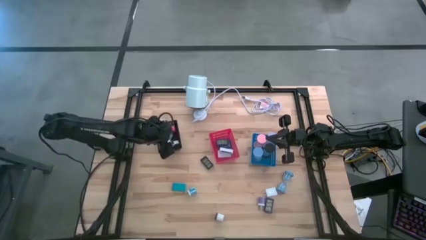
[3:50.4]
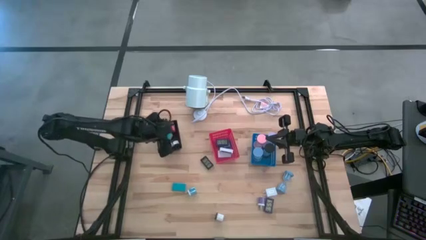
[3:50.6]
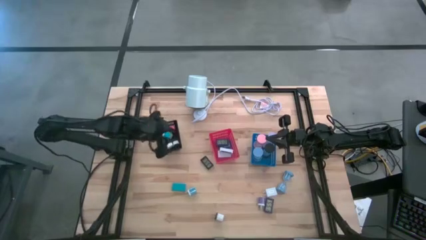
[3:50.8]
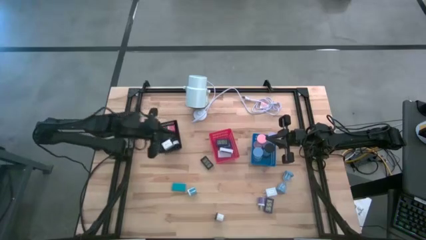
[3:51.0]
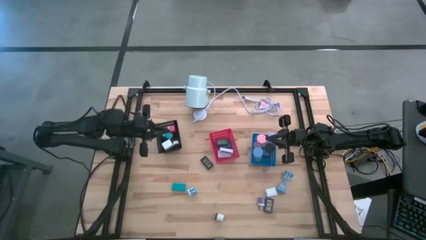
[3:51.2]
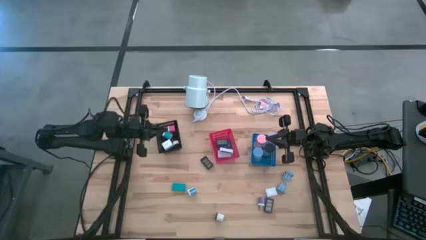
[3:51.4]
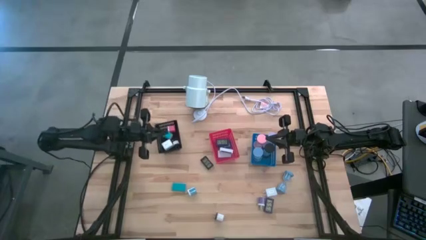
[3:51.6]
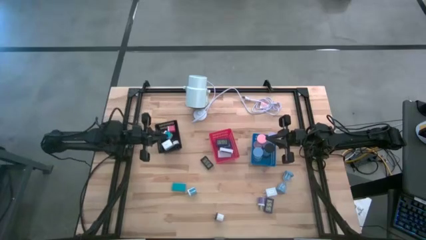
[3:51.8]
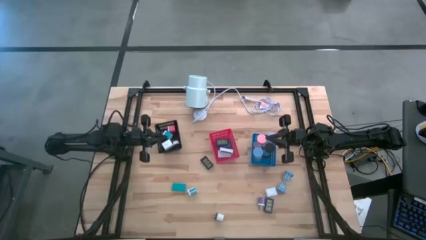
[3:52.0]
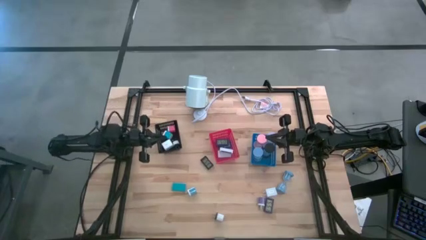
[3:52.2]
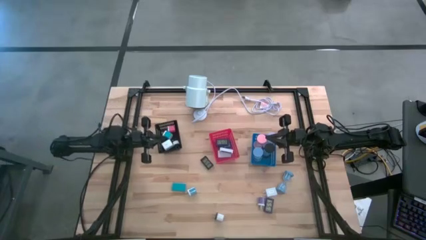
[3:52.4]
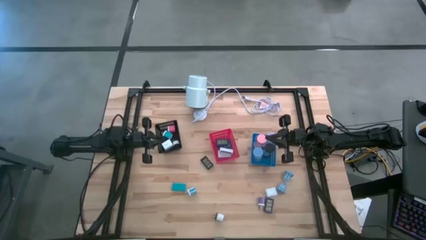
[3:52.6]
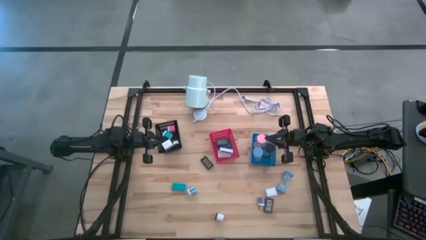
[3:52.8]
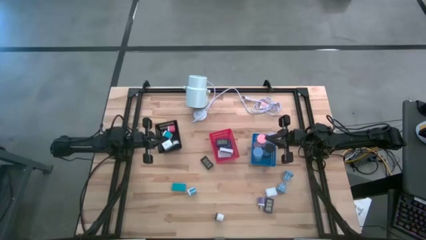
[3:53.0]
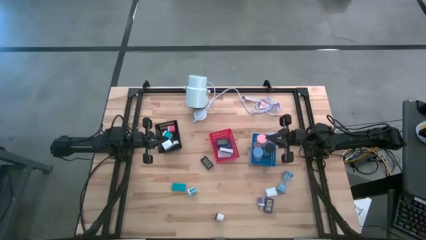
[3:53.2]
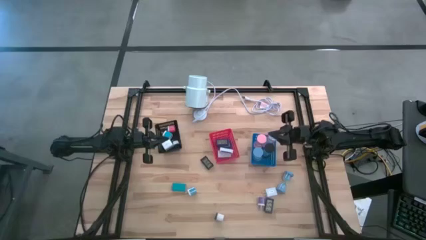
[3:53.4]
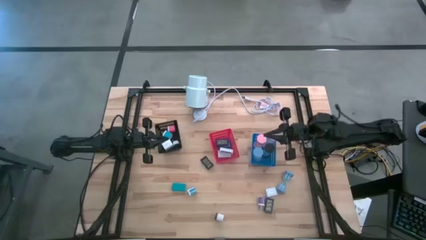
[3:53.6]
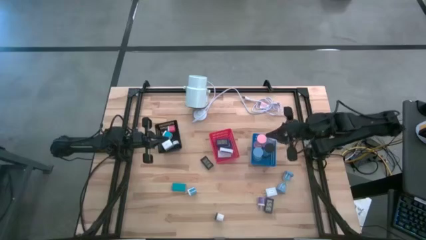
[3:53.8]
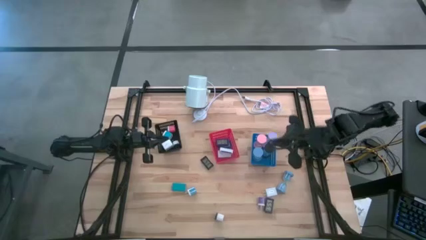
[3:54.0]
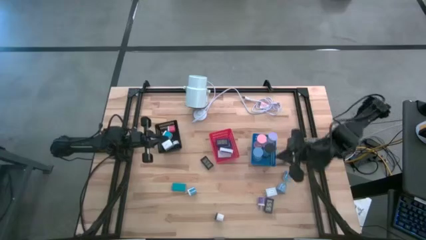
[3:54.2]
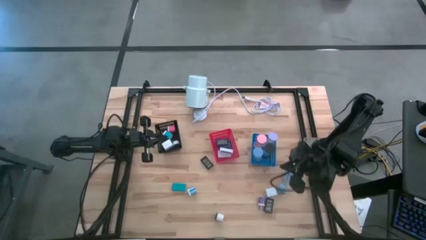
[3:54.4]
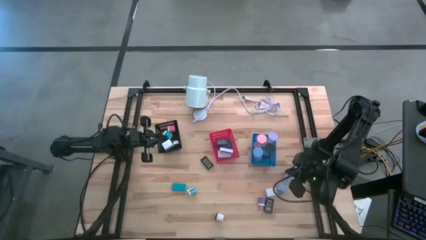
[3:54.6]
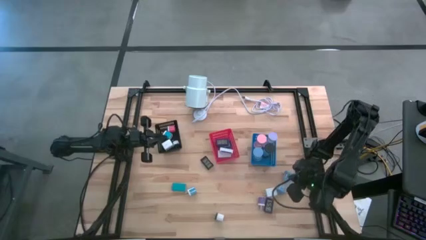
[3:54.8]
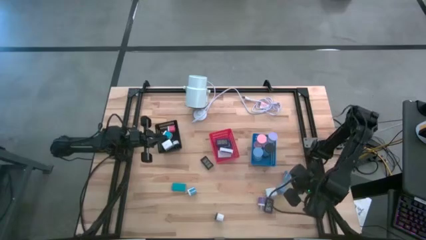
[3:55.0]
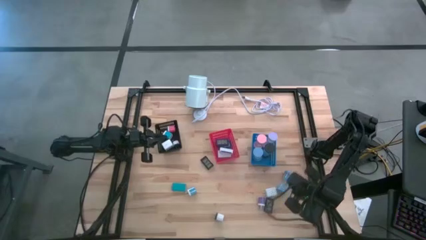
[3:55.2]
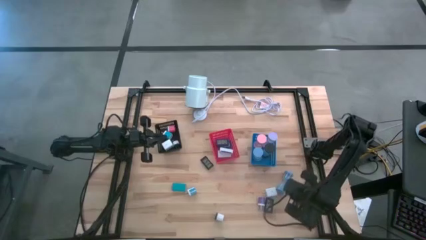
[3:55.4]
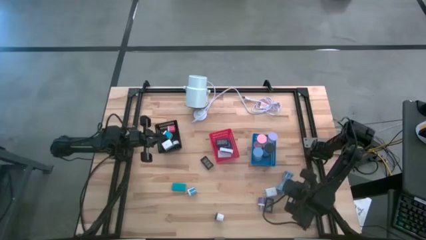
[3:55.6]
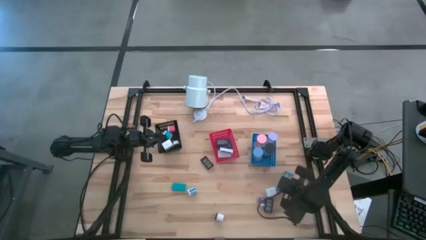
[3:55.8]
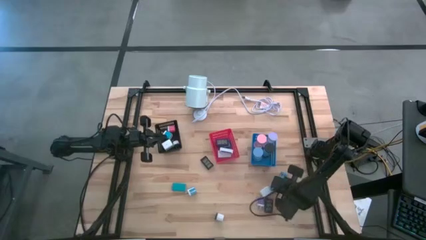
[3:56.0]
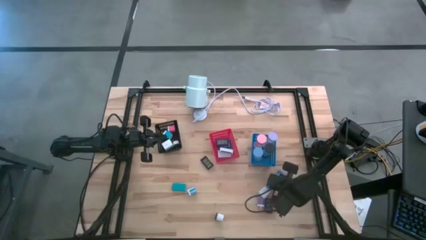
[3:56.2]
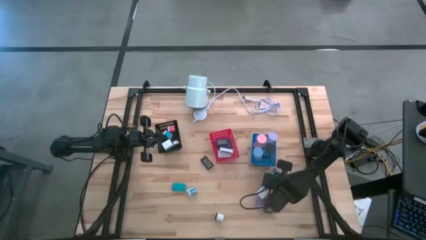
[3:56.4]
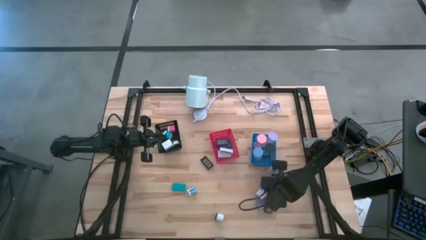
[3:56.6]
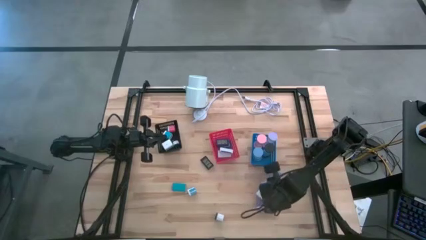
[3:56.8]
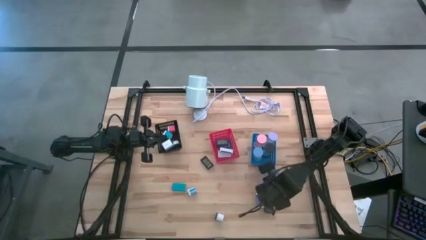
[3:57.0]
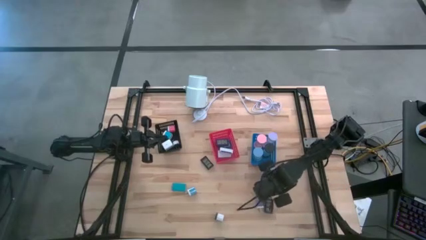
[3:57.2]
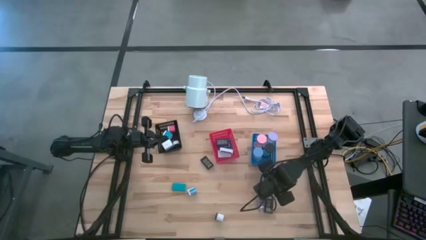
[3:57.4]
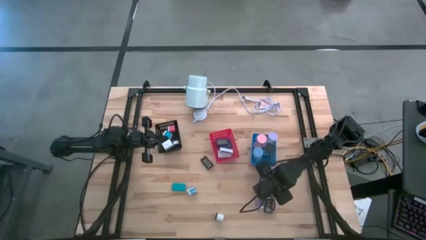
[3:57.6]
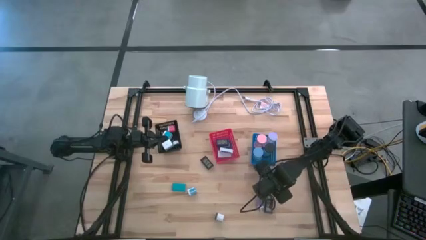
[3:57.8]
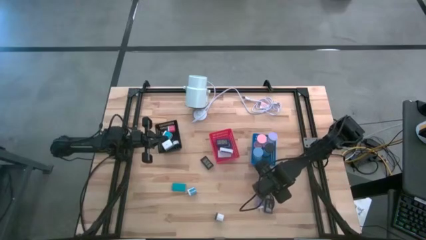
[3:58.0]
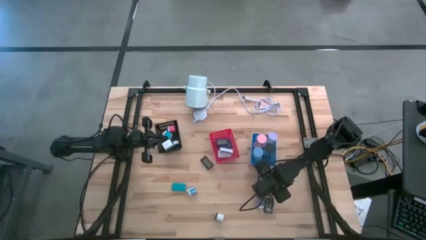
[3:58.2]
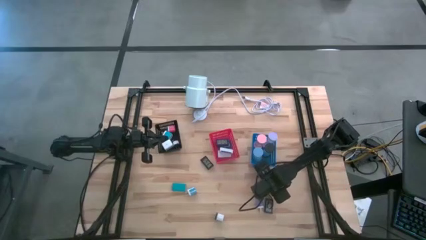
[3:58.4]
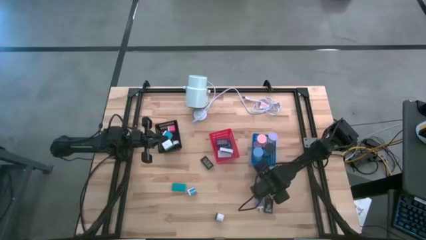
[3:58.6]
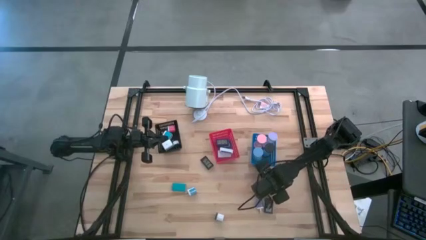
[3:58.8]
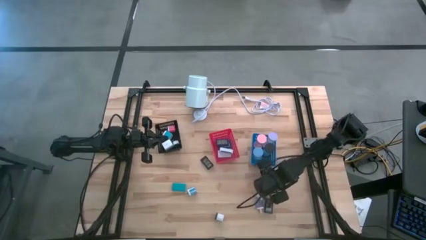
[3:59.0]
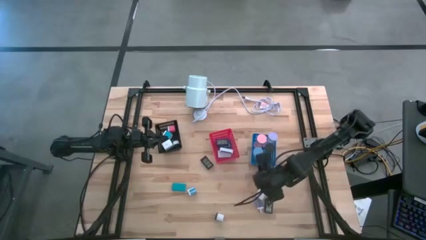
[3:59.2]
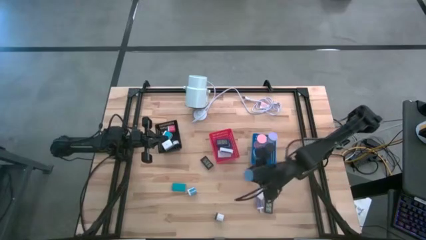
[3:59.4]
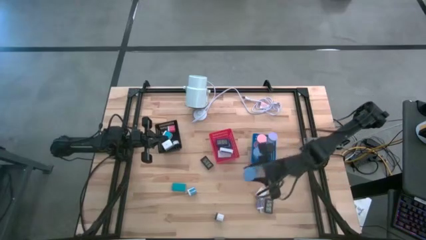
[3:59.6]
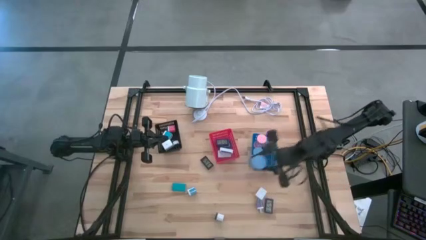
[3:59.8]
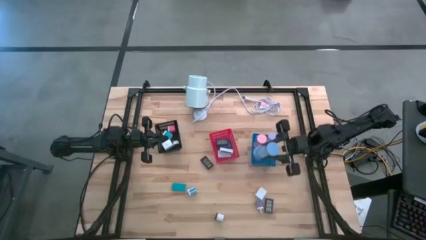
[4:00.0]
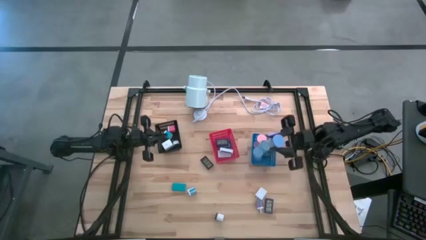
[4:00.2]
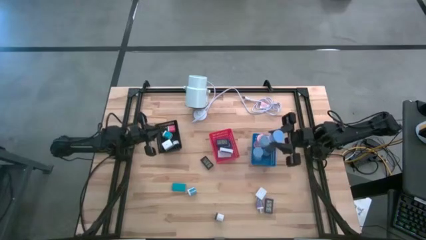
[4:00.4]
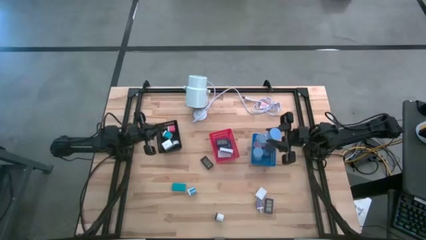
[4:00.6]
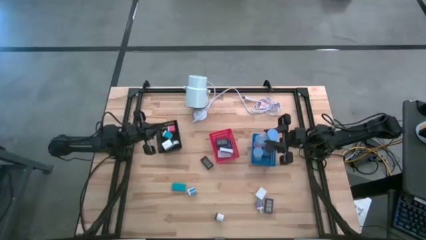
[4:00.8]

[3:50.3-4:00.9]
Task: Pick & Place Office items
Put the blue hourglass into the blue bin

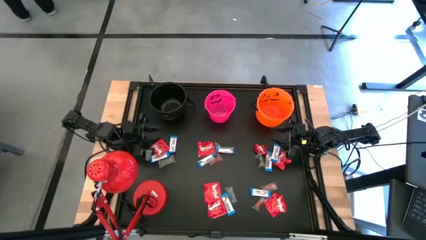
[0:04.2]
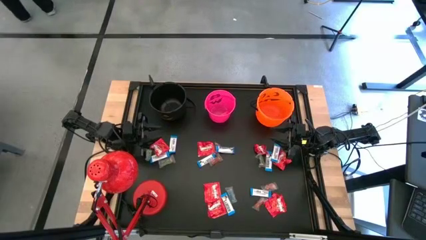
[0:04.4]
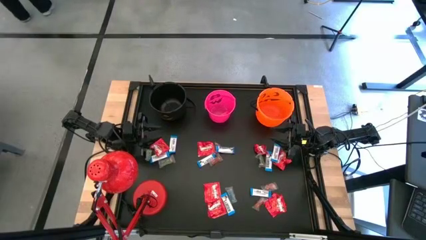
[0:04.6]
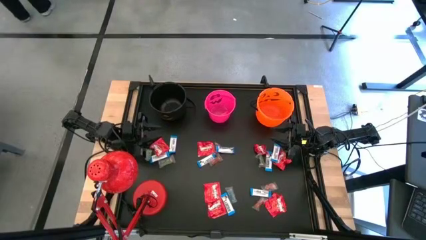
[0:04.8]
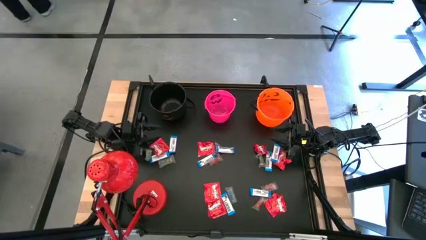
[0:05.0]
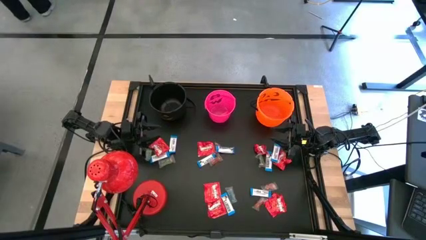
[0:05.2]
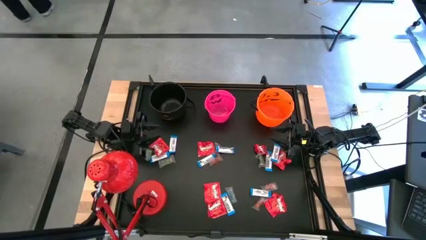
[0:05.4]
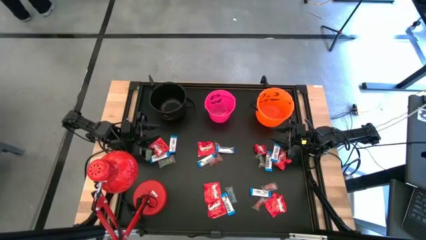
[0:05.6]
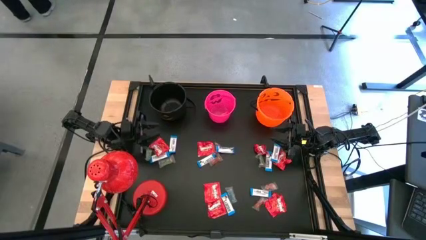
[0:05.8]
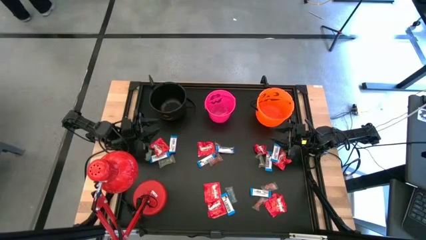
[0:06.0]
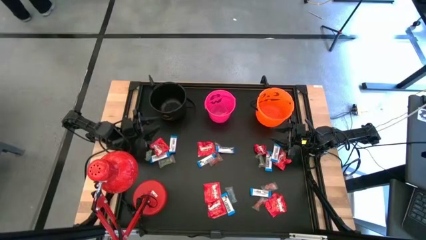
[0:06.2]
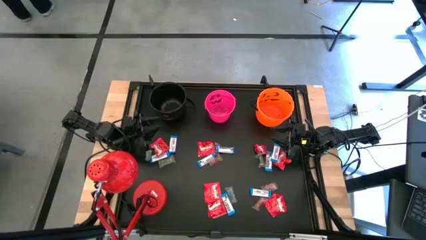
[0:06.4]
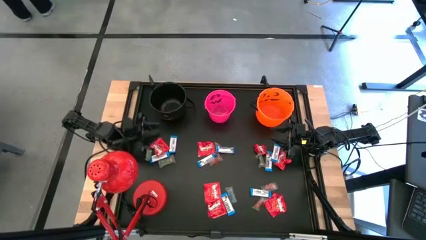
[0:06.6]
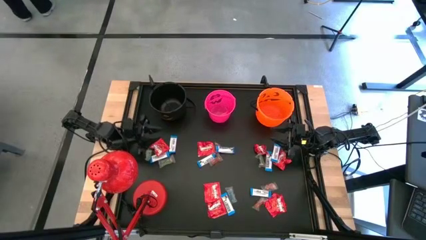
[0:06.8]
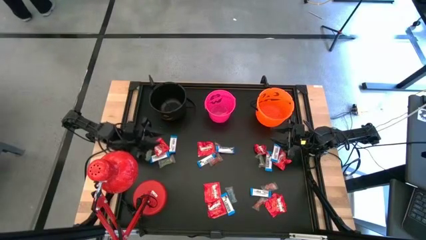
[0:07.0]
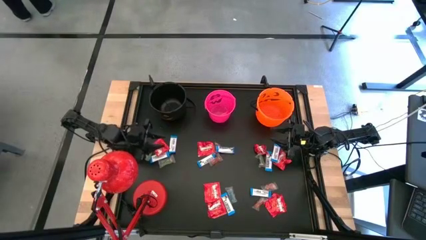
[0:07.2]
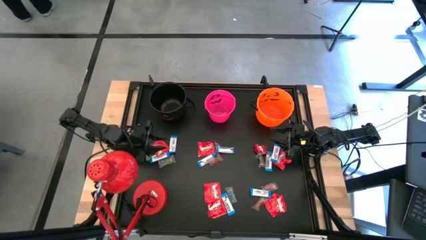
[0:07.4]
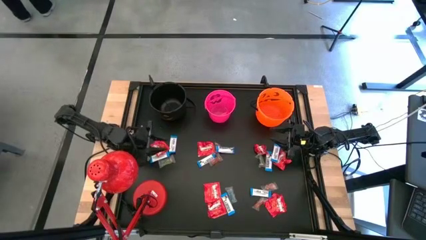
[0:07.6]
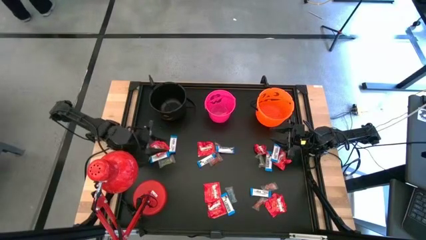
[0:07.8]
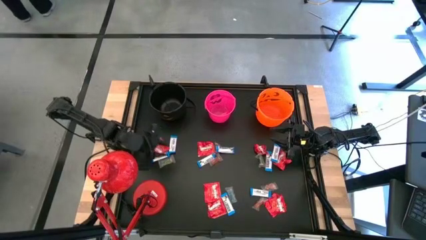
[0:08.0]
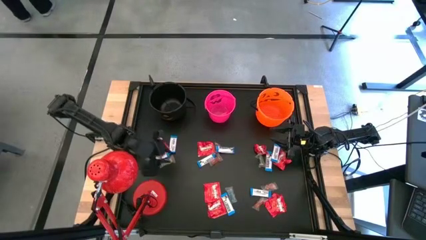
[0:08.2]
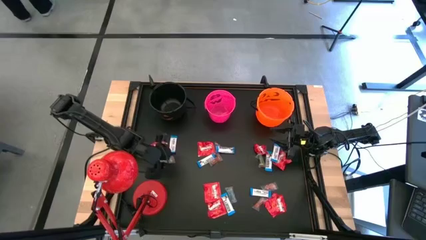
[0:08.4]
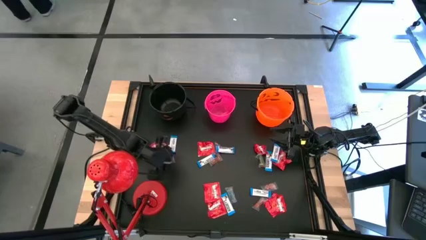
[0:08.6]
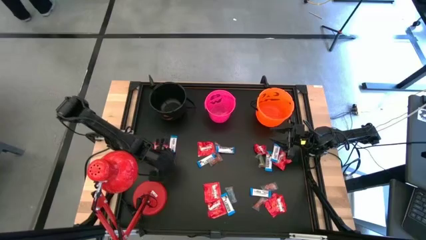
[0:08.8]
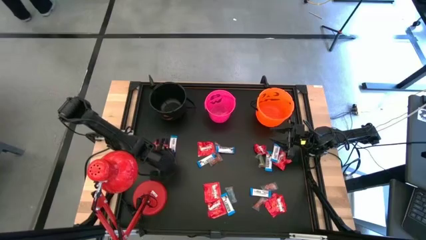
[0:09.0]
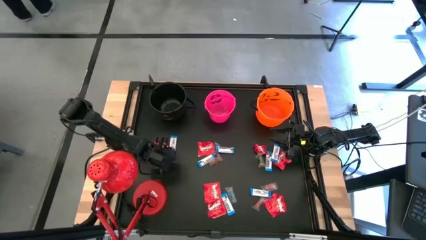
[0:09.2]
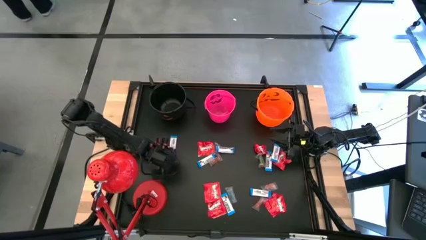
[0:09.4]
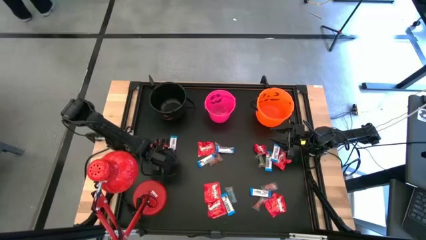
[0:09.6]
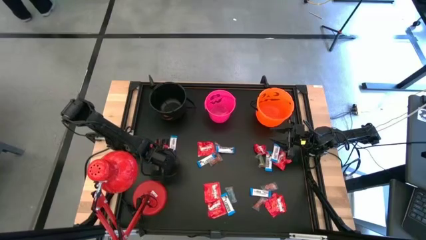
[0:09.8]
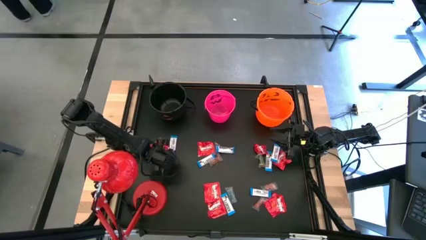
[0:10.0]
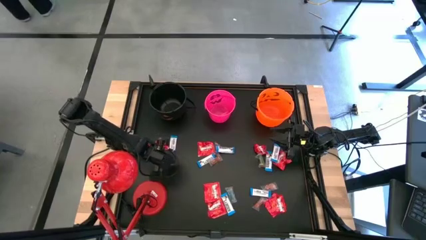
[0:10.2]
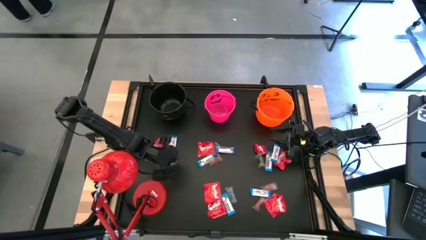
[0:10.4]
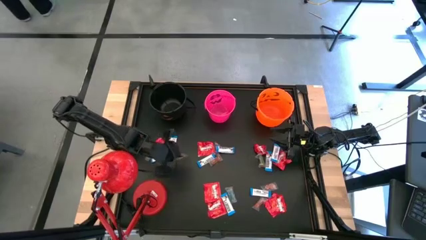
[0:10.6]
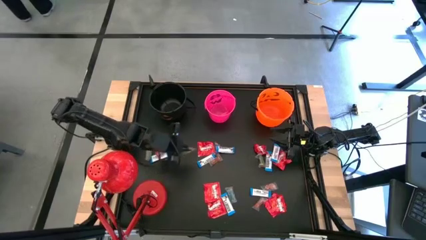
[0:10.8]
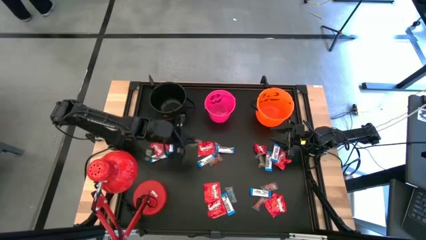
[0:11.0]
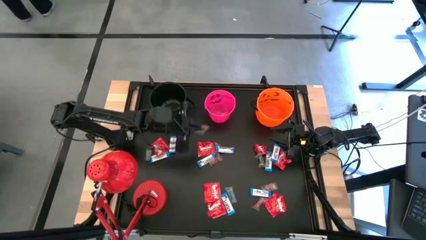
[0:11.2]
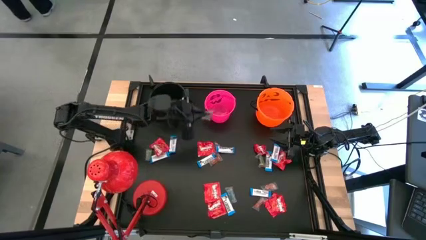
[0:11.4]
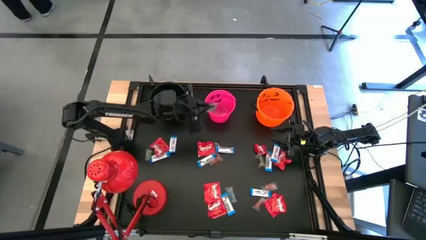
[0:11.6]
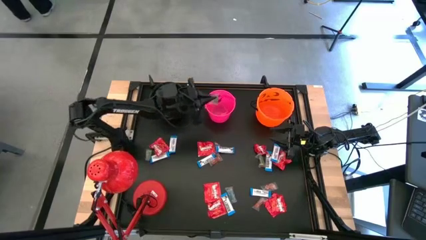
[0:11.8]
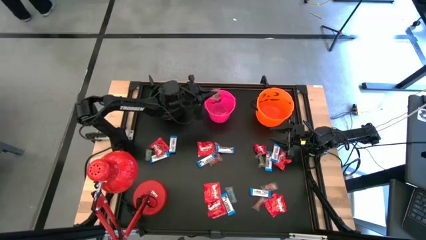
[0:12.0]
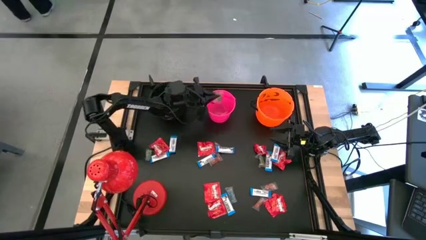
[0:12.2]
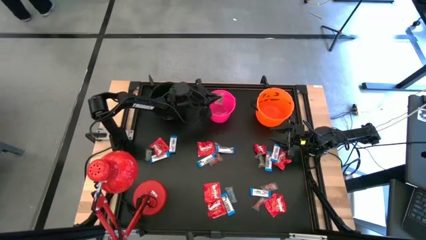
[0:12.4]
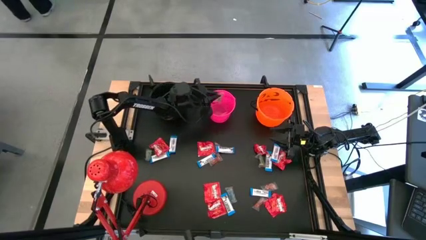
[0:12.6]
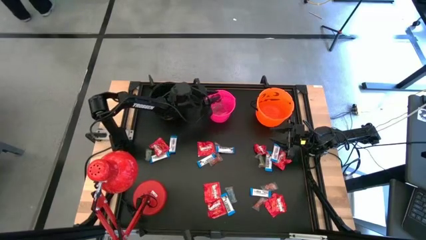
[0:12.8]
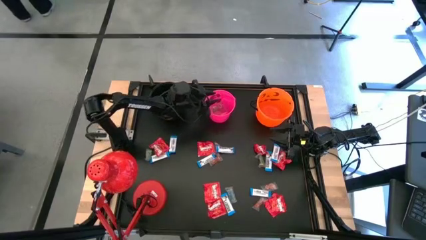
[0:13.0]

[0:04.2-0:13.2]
Task: Organize candy in baskets
Put the transparent candy into the pink buckets
